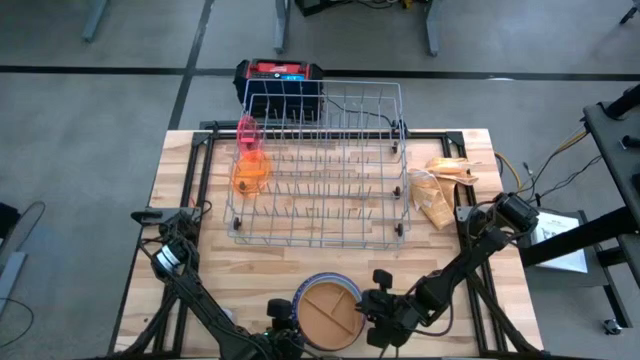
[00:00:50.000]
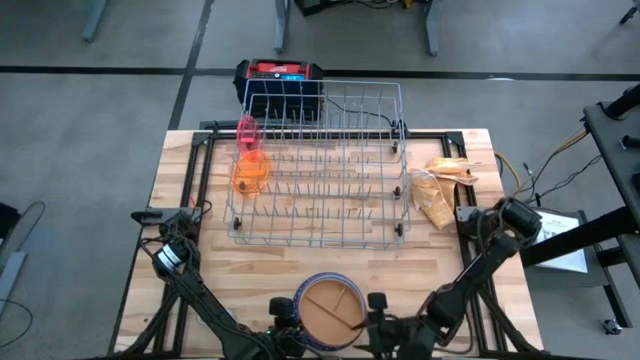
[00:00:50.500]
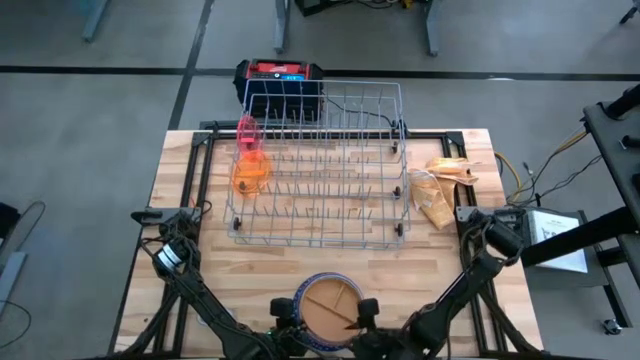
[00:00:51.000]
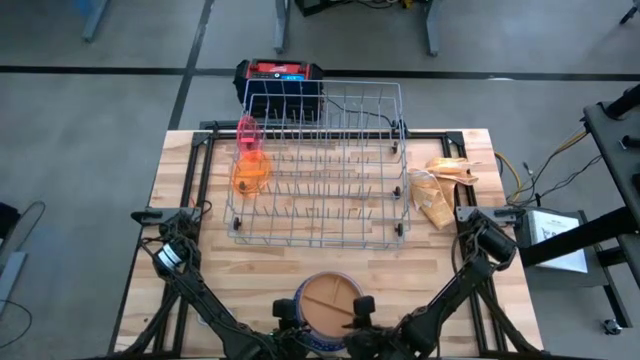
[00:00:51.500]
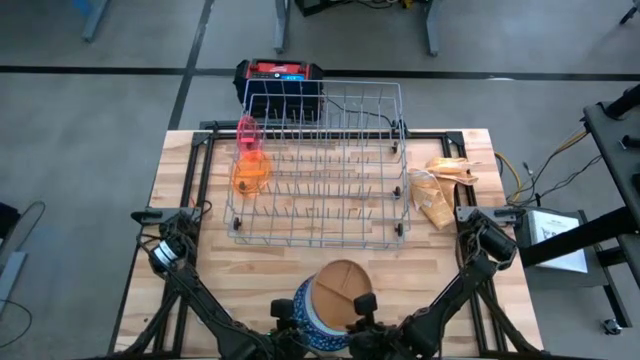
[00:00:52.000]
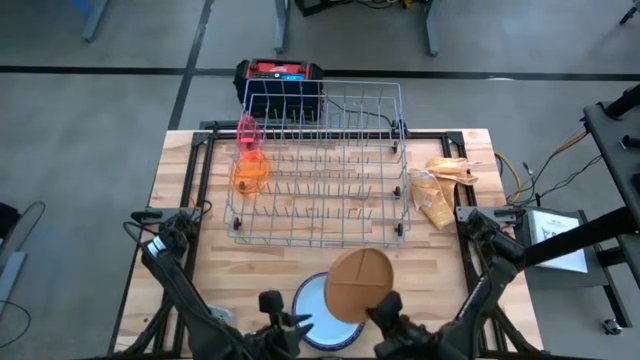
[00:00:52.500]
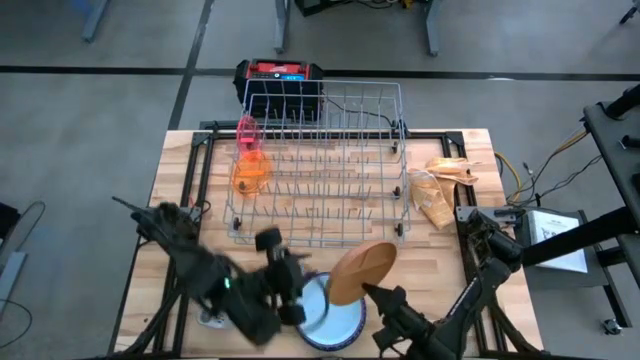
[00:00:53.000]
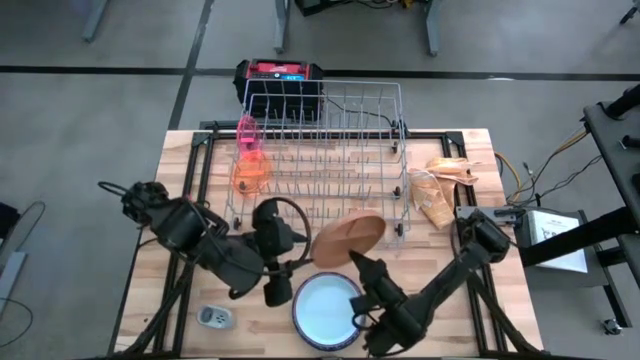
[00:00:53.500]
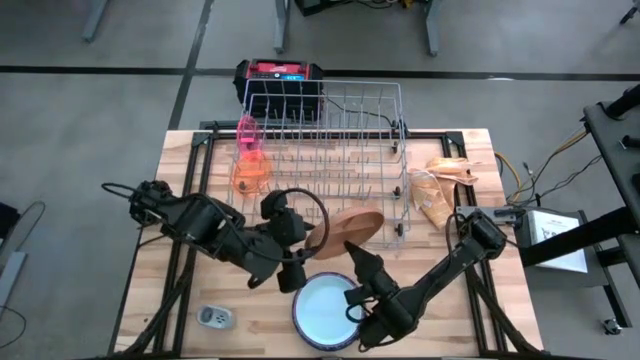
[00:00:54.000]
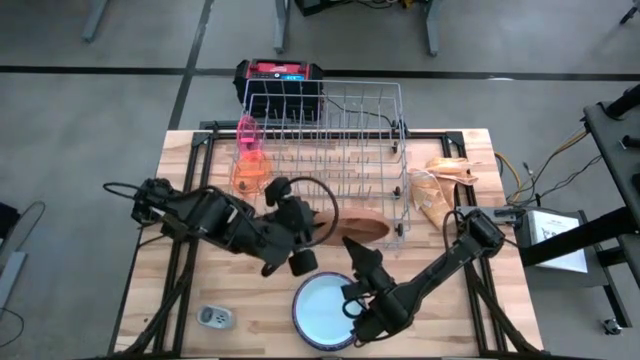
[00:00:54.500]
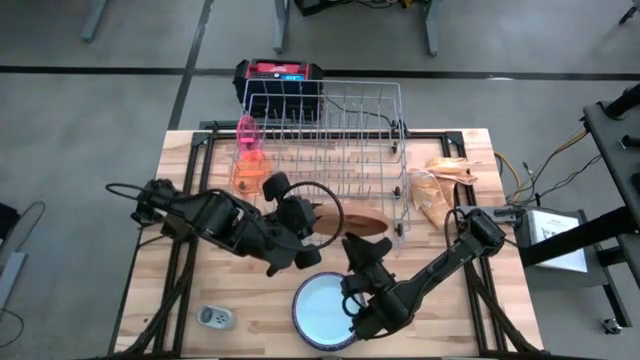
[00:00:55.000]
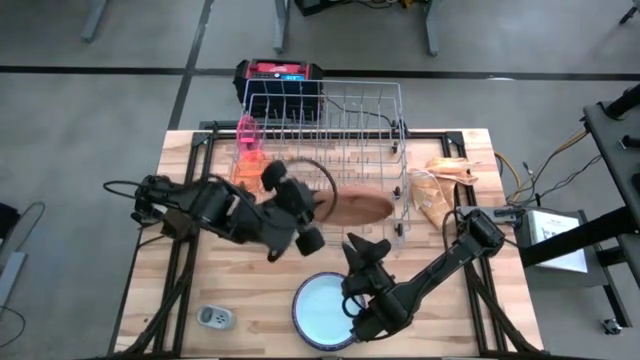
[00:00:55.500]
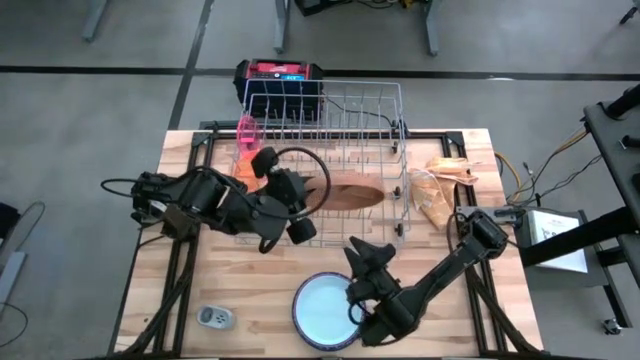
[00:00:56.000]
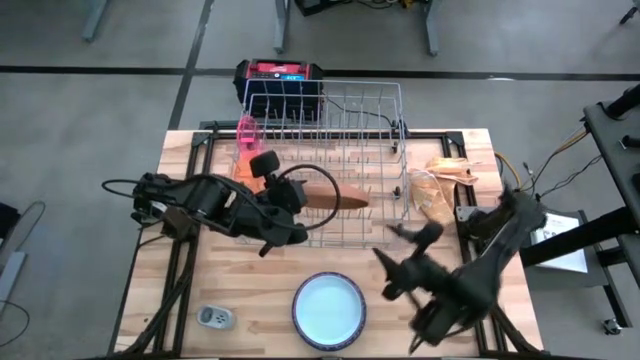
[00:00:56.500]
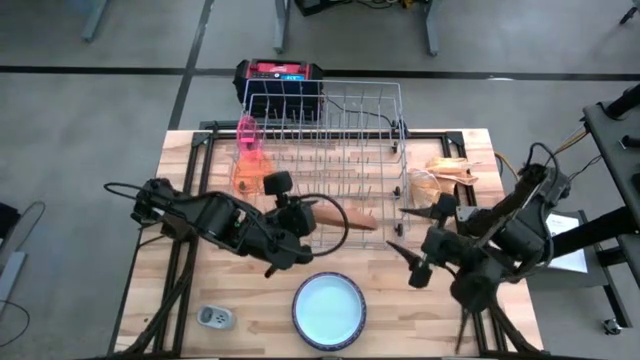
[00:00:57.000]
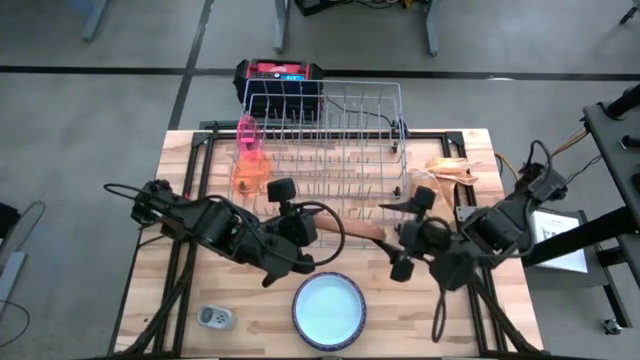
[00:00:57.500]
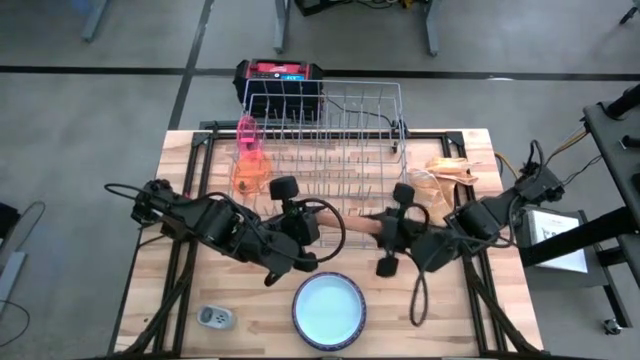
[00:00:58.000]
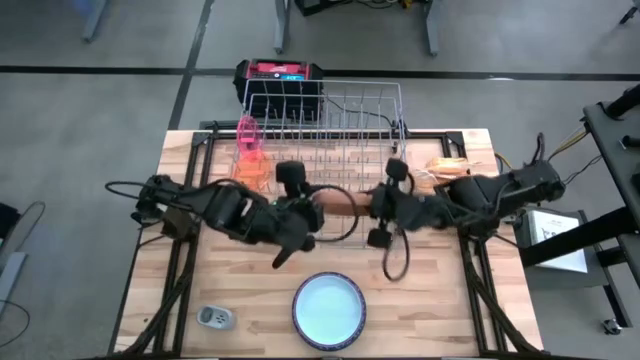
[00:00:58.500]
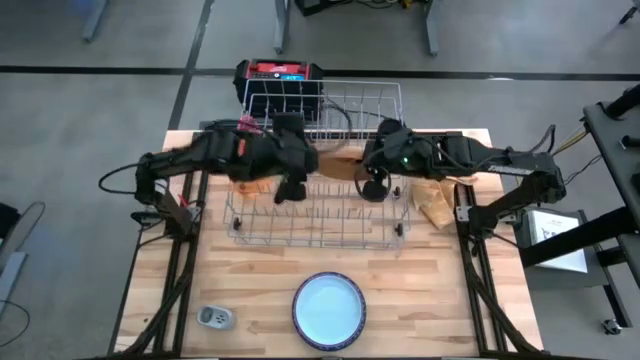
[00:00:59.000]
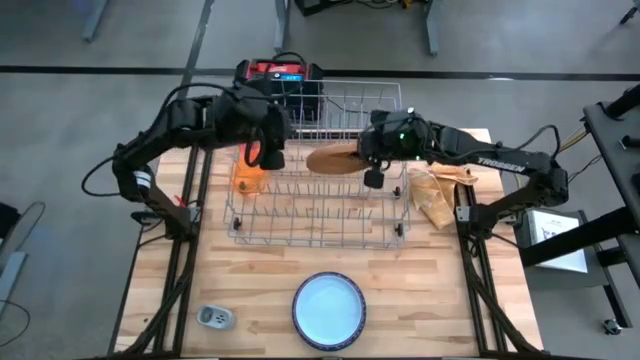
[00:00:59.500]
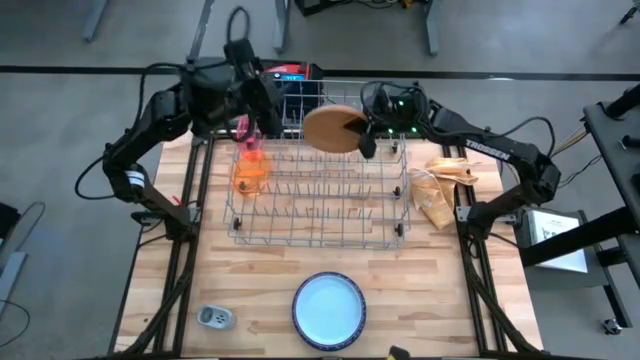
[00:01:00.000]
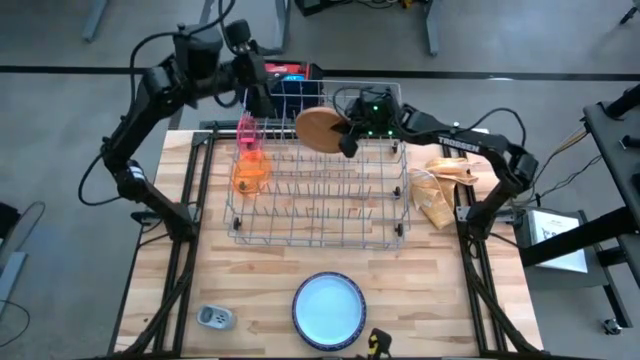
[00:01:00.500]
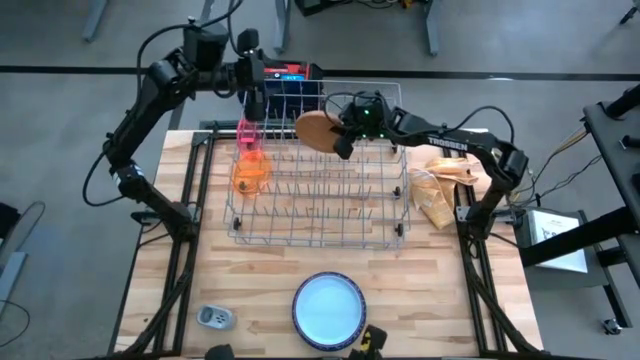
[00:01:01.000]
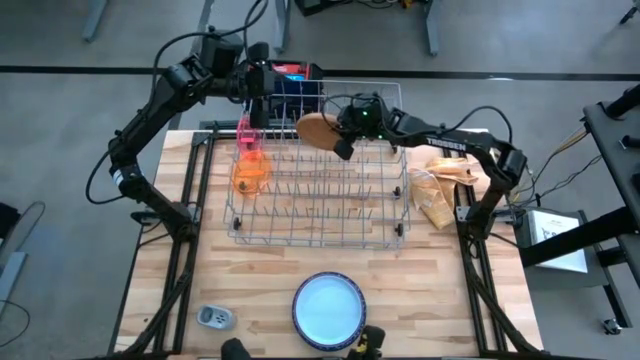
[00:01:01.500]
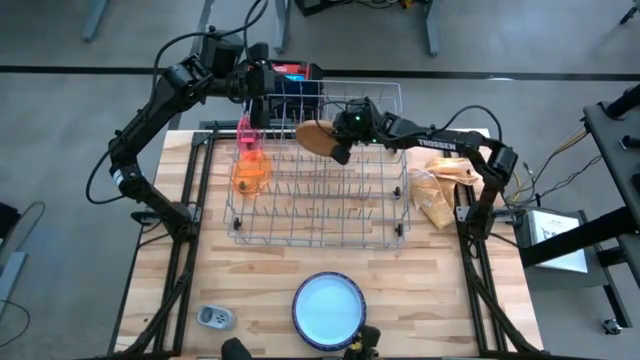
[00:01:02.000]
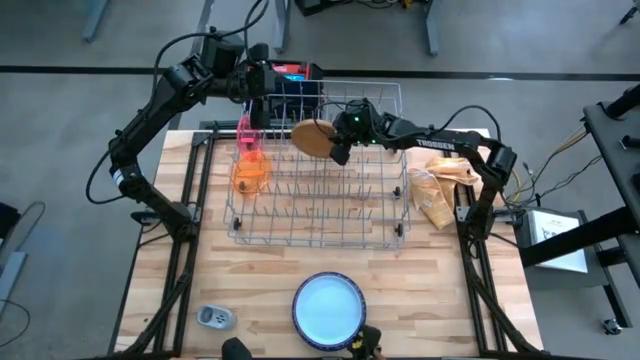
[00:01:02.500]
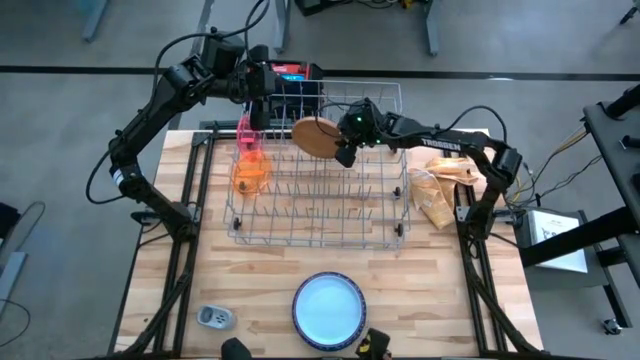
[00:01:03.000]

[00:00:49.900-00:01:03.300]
Task: Sort dishes
Put the brown plate into the dish rack

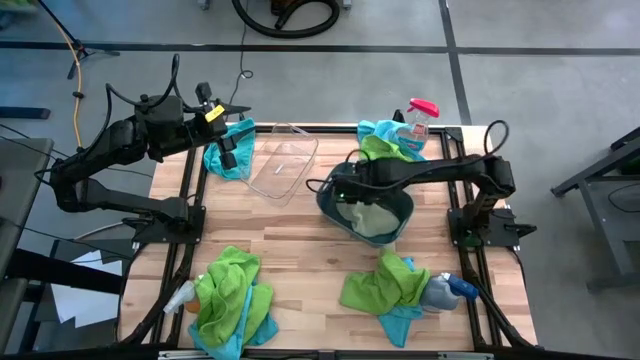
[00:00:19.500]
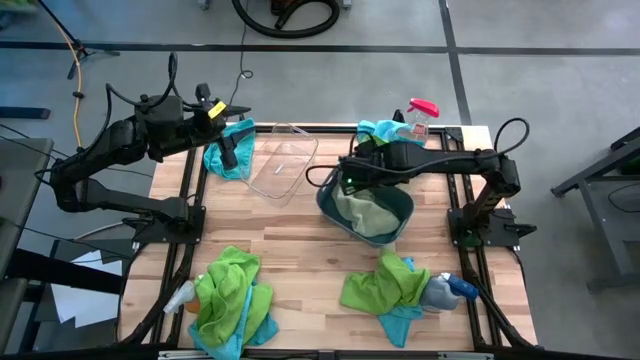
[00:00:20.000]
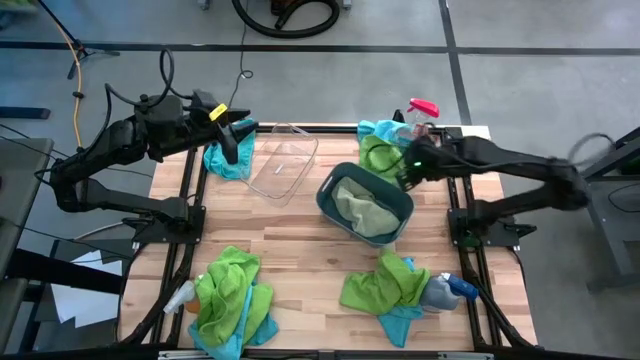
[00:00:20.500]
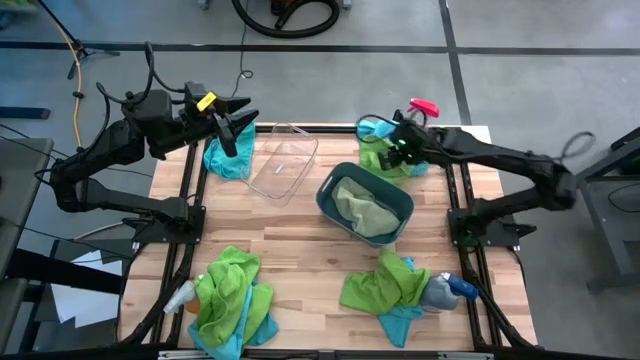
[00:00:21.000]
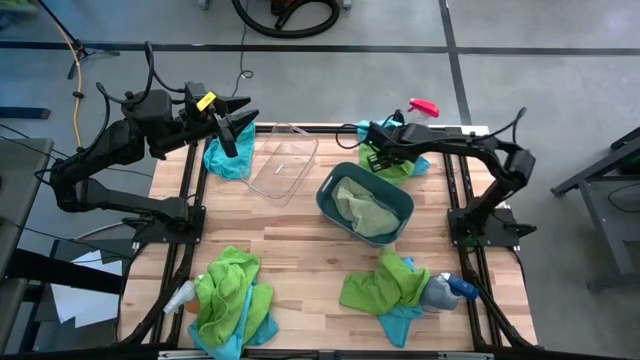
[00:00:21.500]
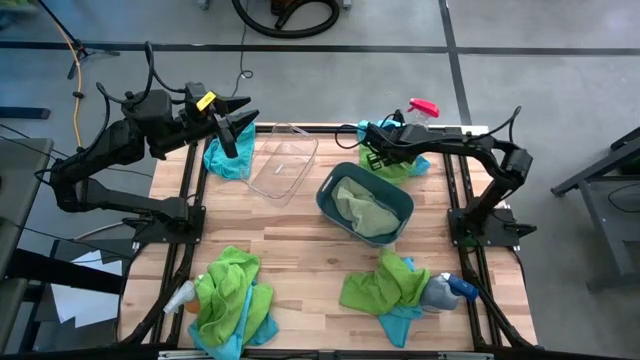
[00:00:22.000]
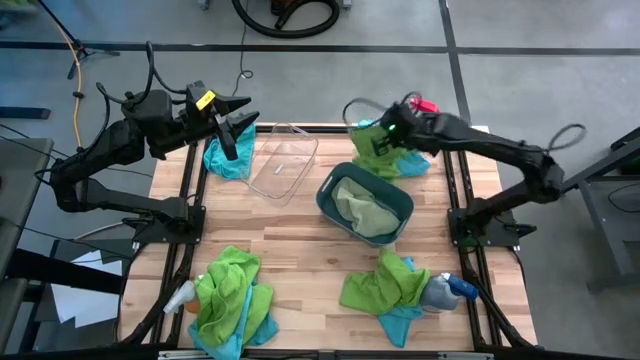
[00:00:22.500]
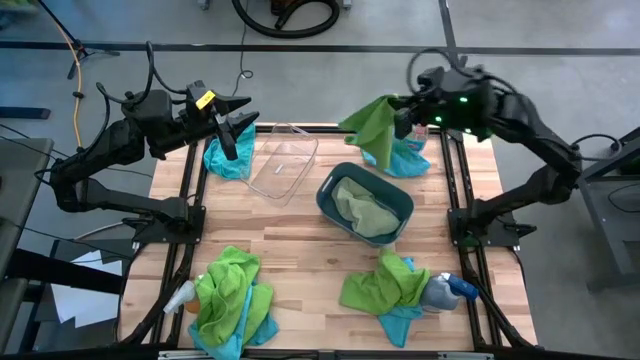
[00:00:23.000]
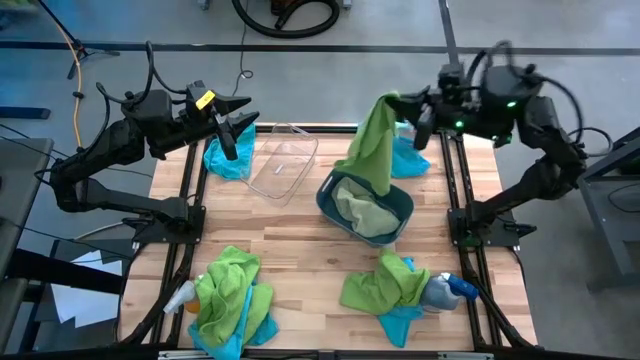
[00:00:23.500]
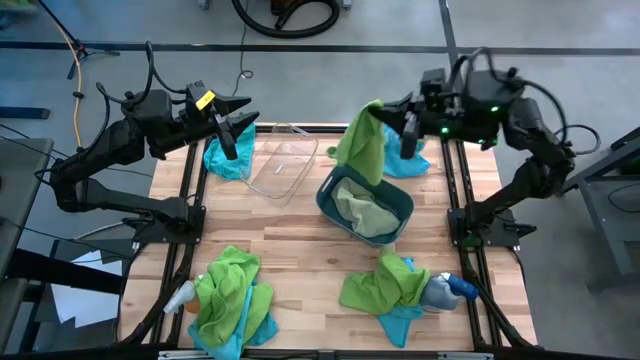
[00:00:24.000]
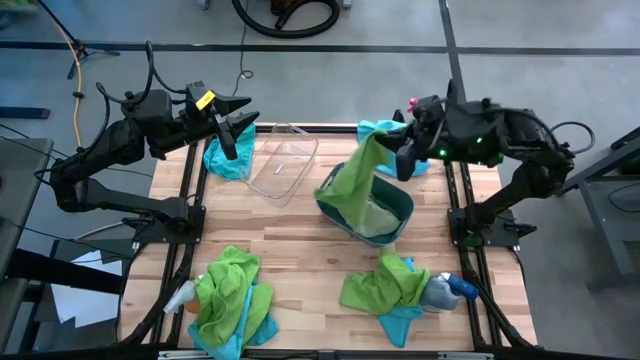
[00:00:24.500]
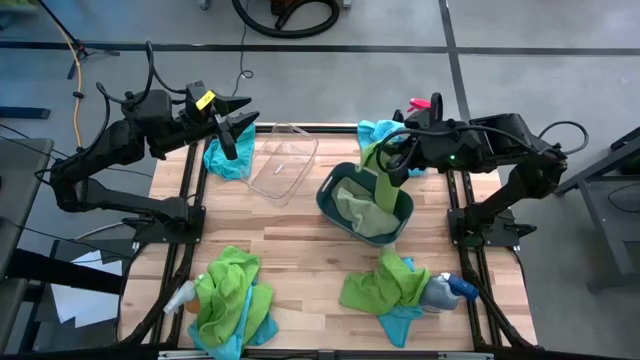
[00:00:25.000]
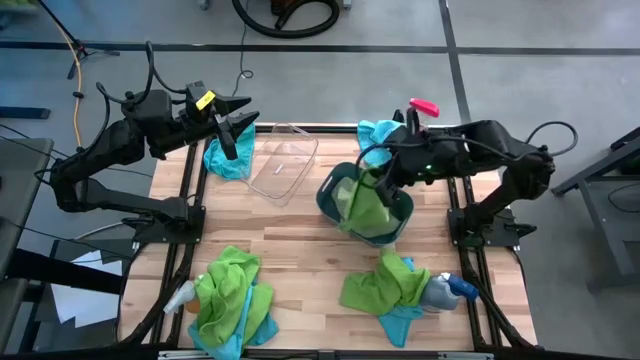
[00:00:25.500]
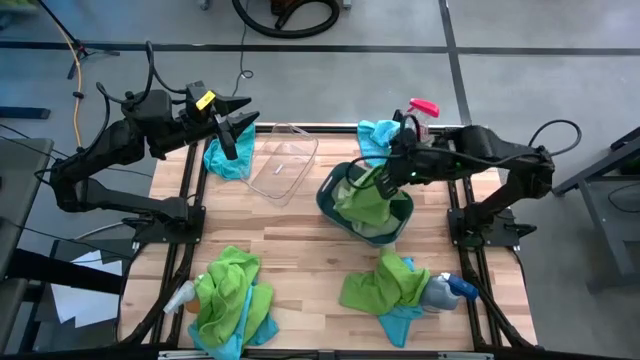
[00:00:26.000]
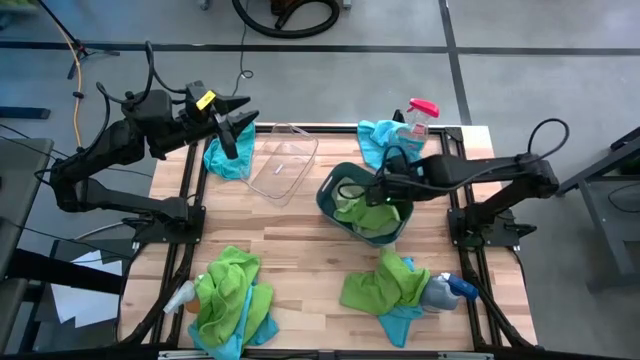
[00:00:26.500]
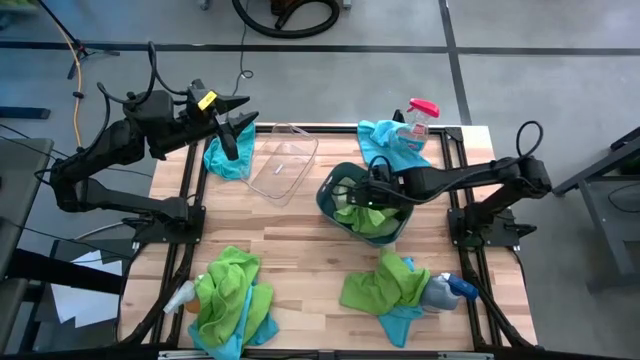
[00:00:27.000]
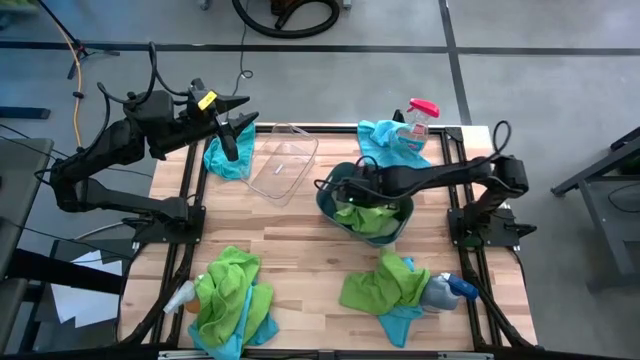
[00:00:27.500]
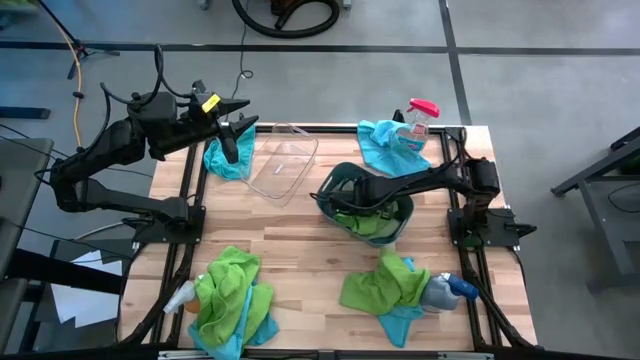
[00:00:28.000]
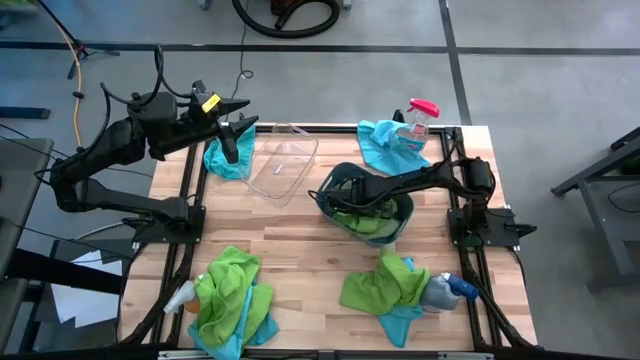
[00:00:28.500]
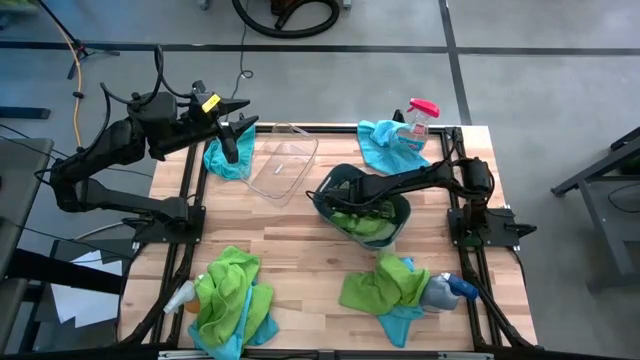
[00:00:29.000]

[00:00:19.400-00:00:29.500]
Task: Sort microfiber towel by color & place in baskets
Put the green microfiber towel into the blue bin
